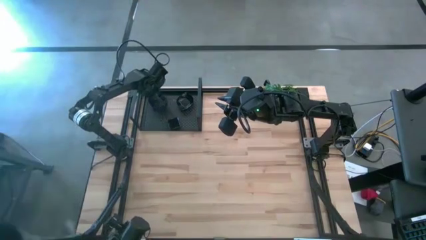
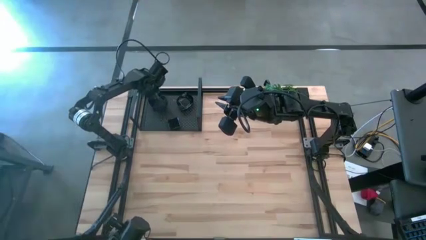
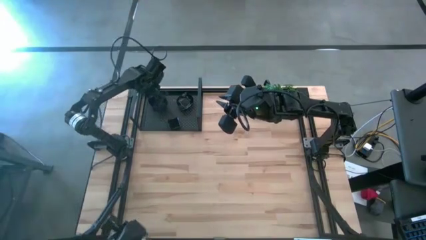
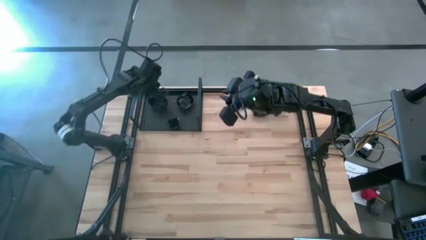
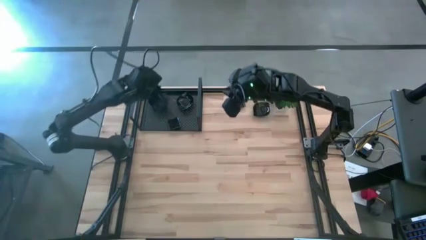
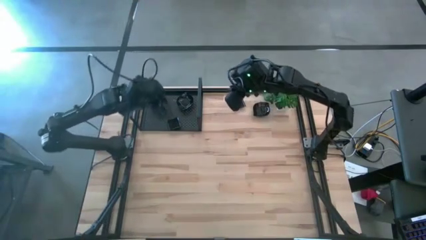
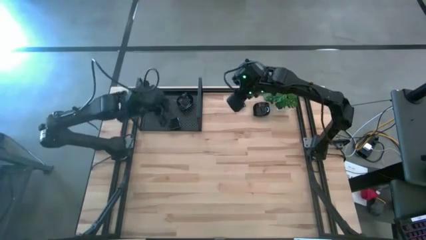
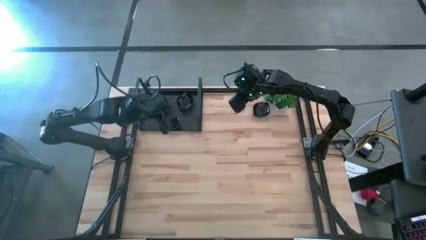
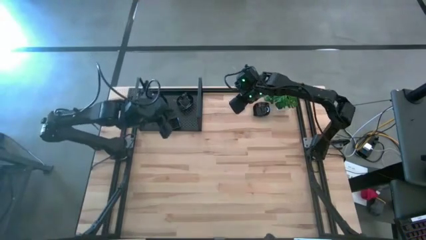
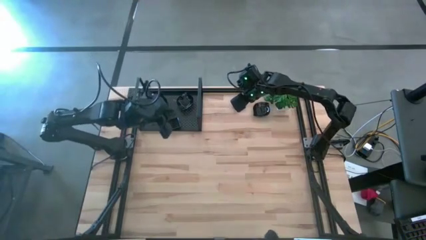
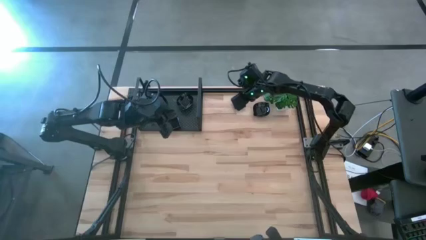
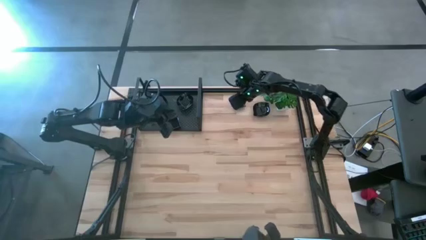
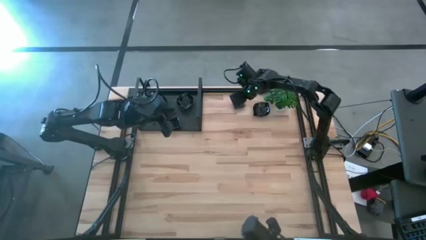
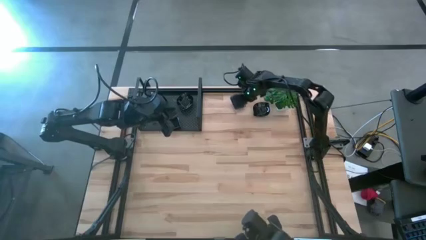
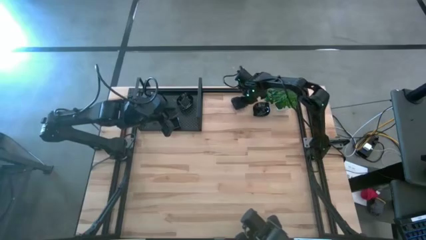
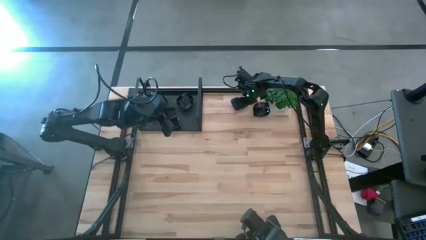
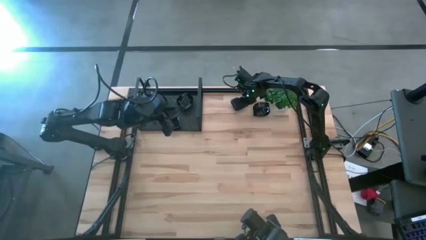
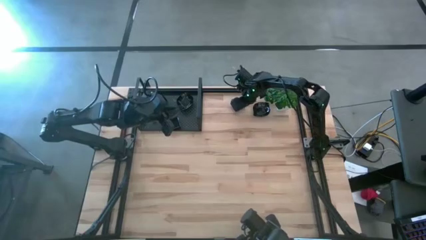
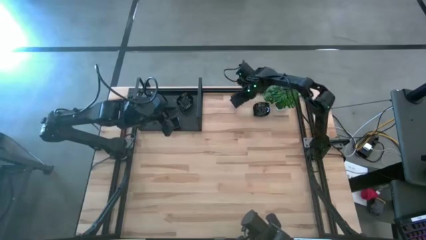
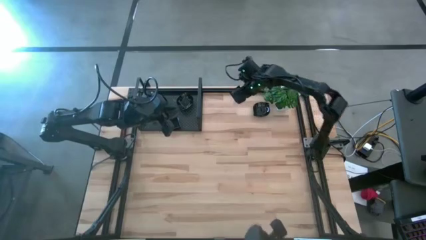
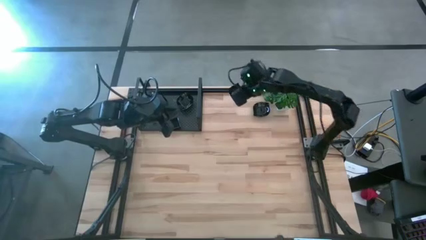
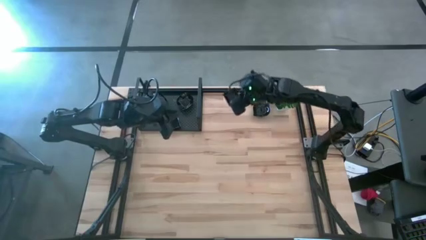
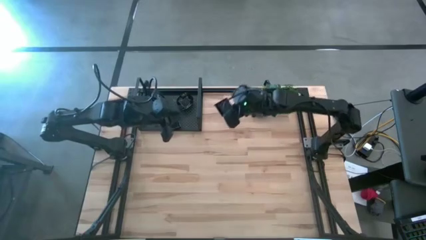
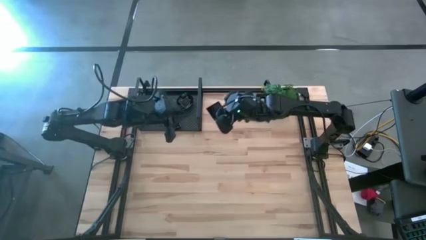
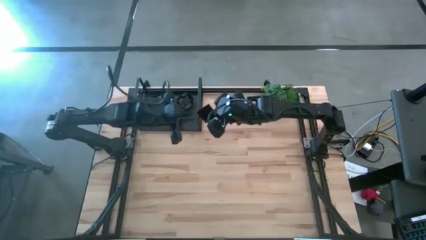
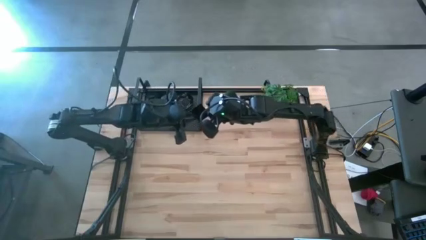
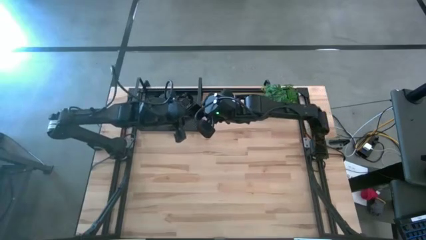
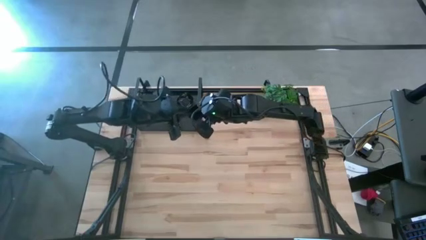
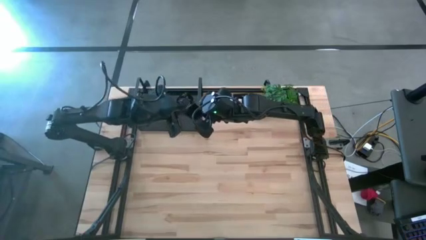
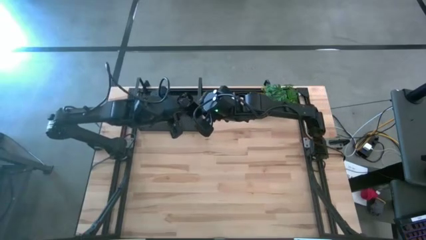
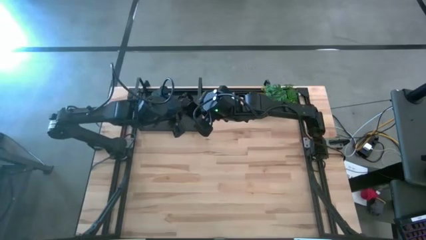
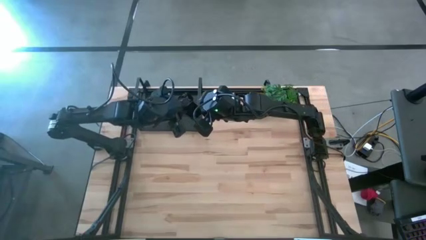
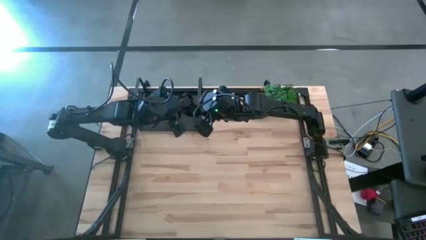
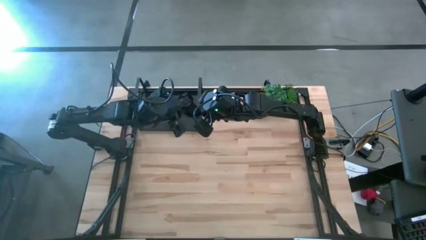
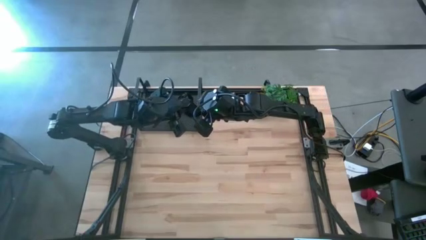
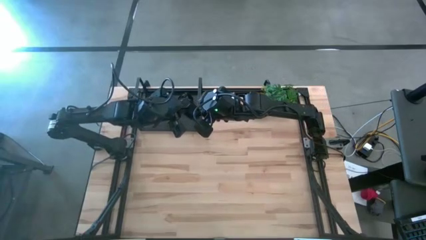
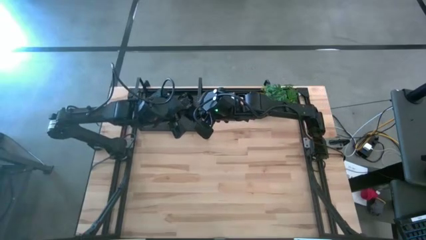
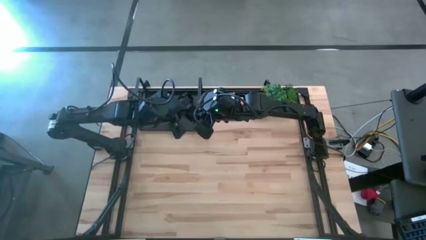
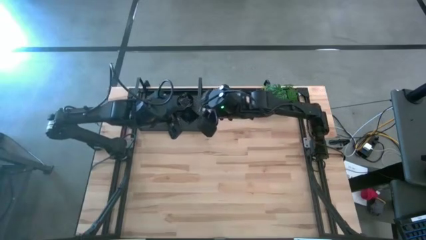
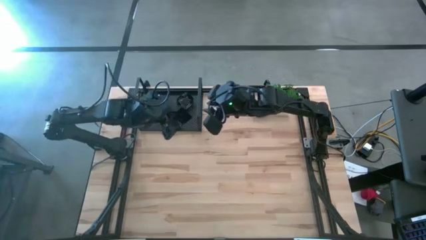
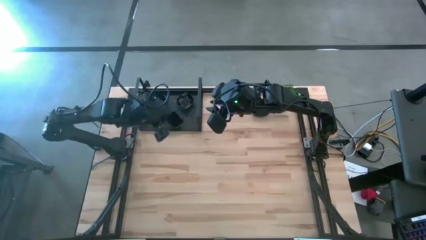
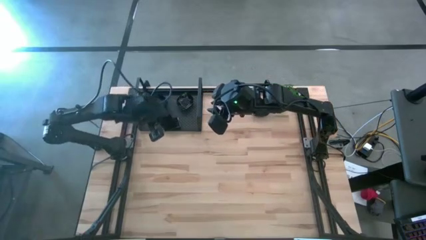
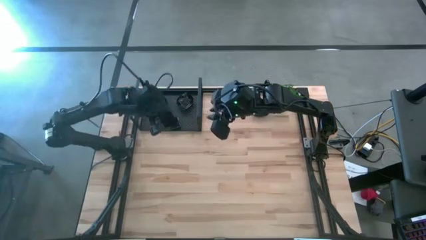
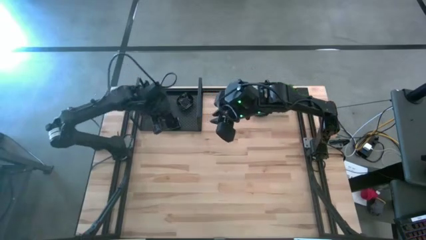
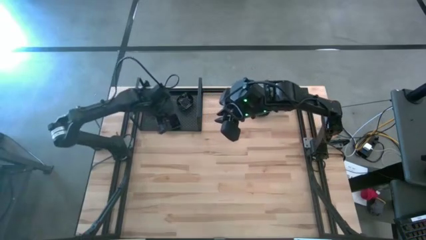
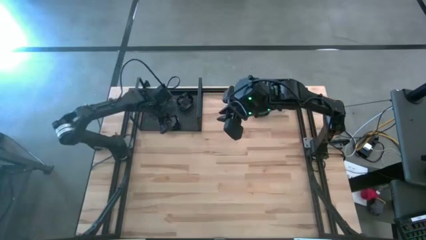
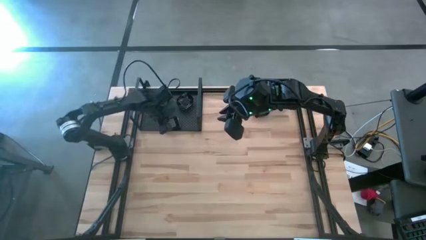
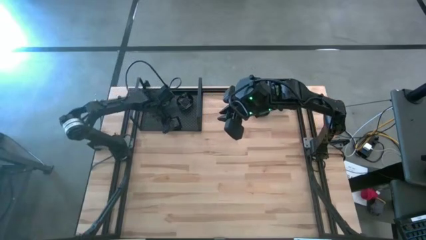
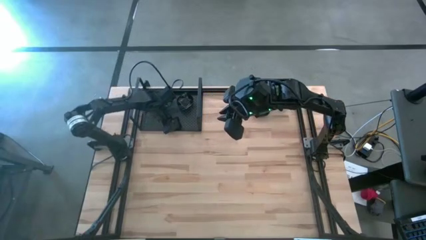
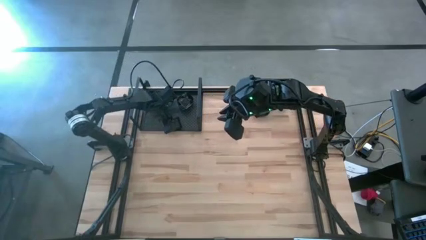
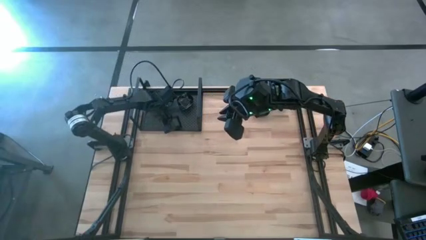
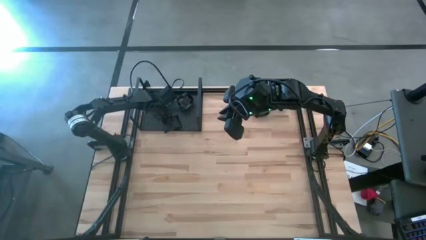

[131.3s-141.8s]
Task: Pick & Place Mini shaped plates
Stack the black square plate on top of the black square plates on the shelf

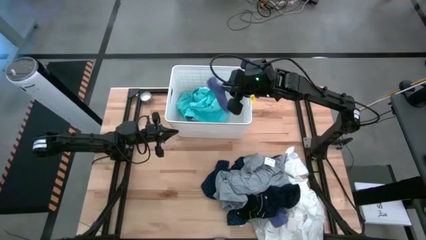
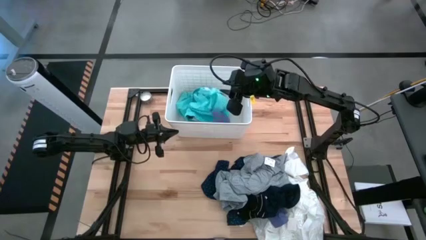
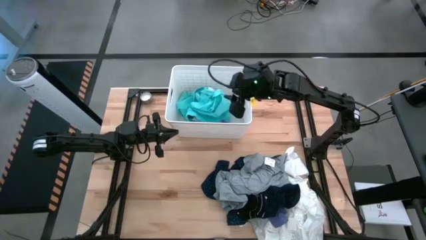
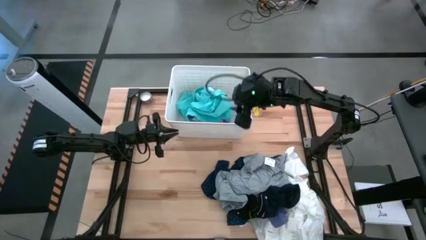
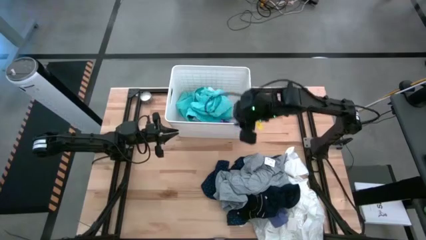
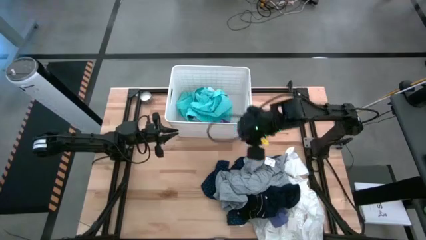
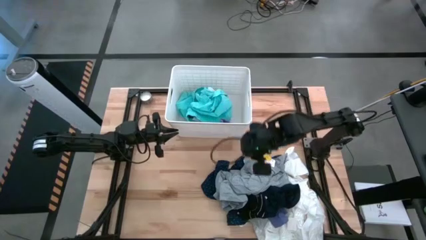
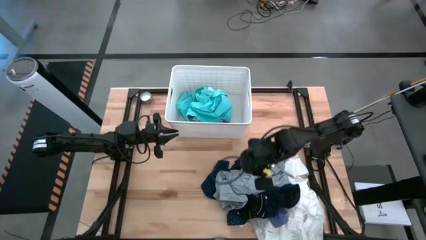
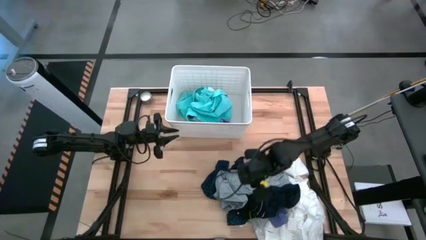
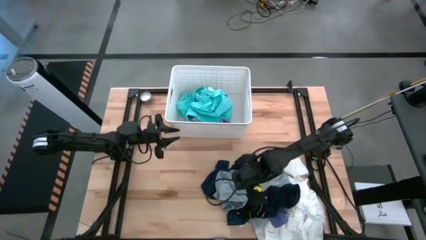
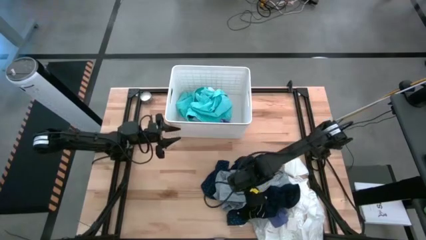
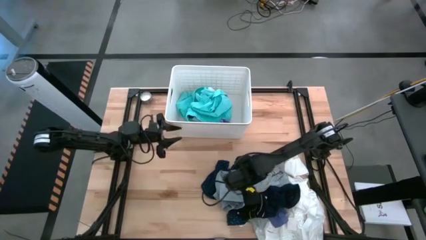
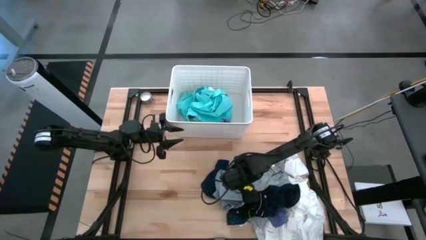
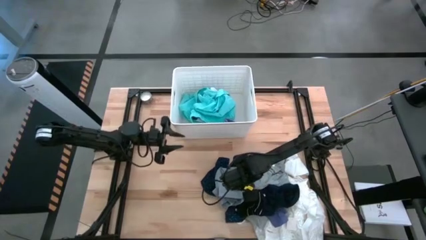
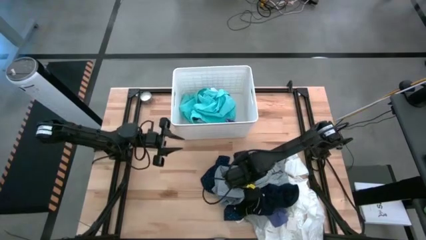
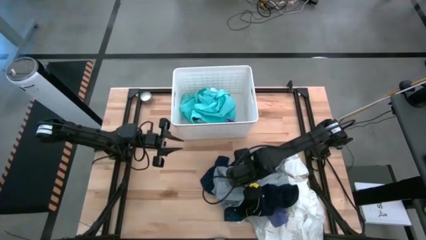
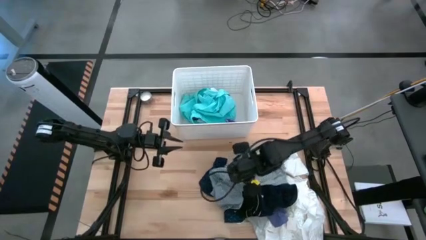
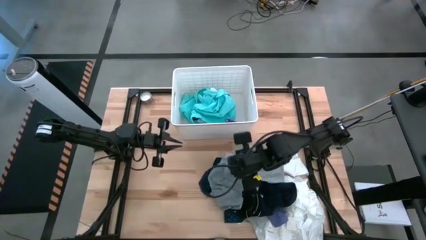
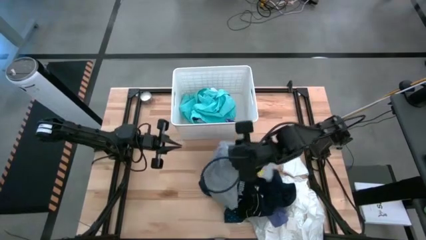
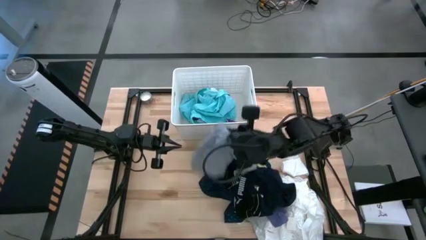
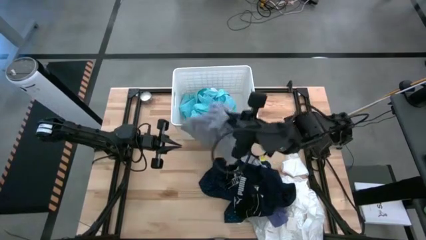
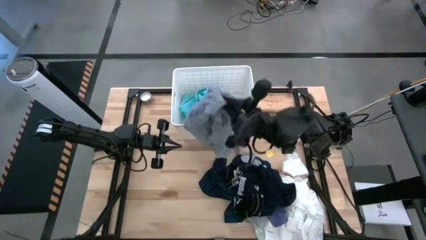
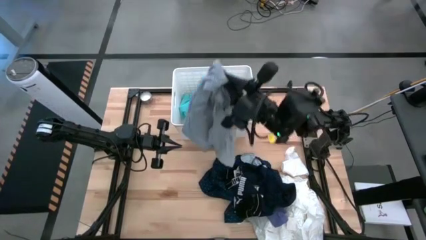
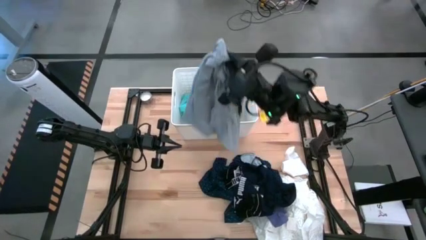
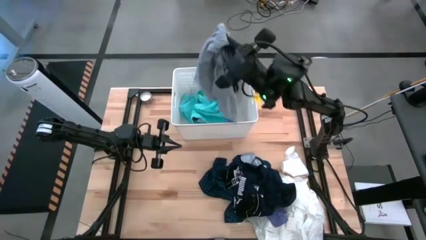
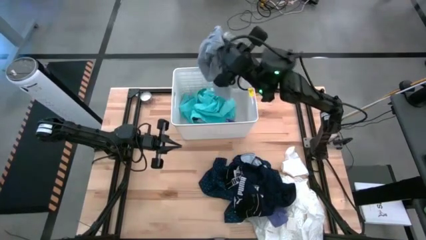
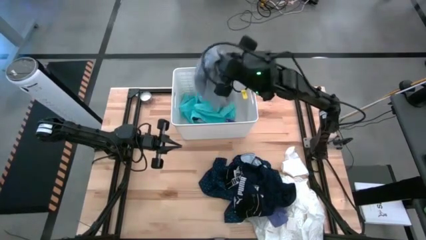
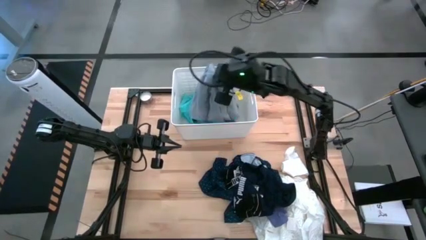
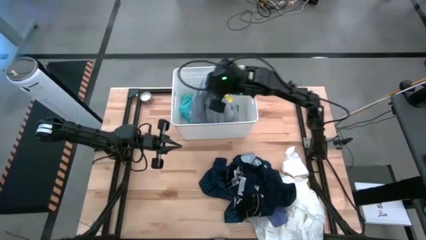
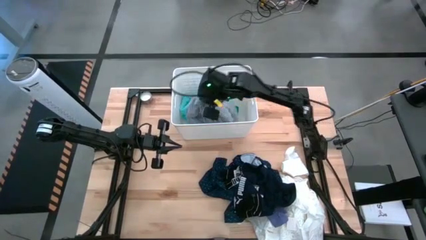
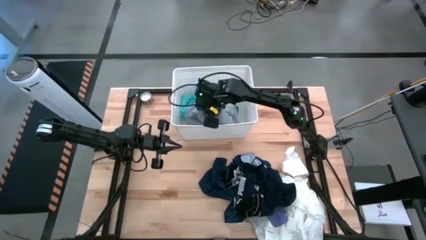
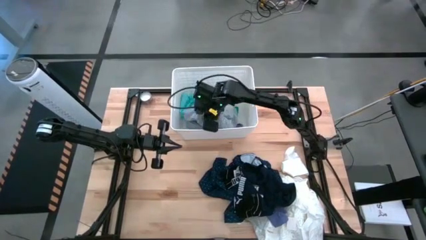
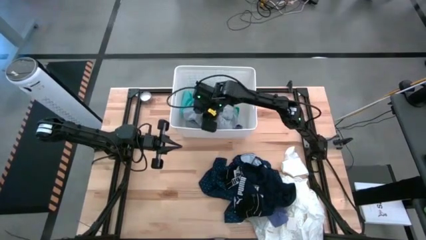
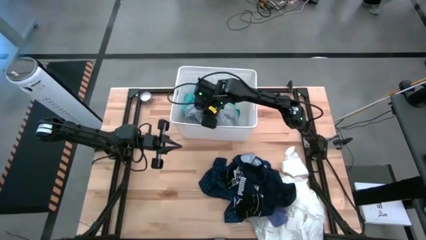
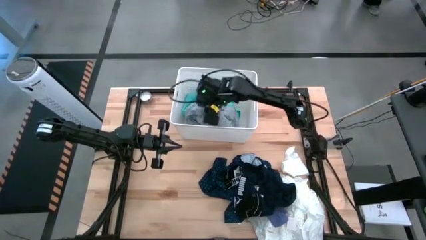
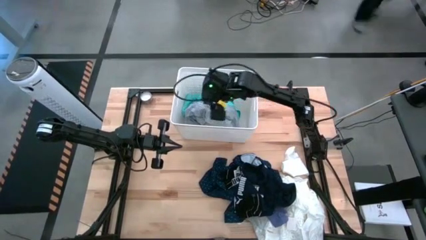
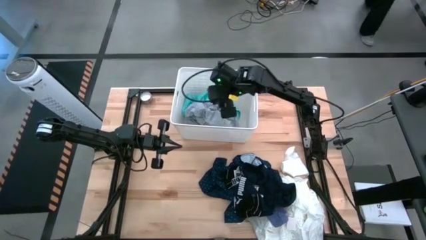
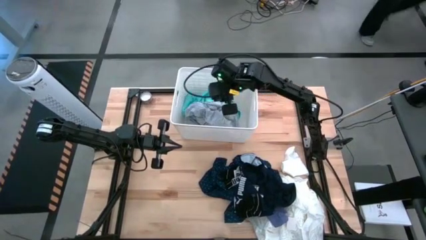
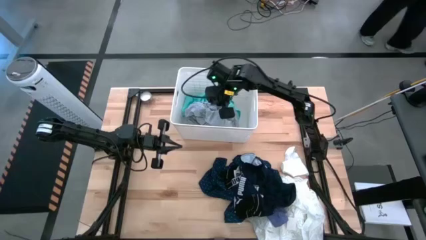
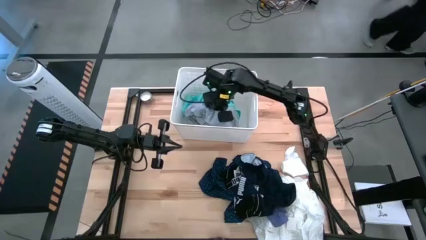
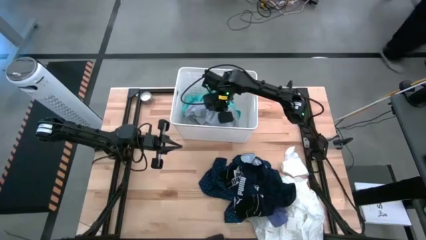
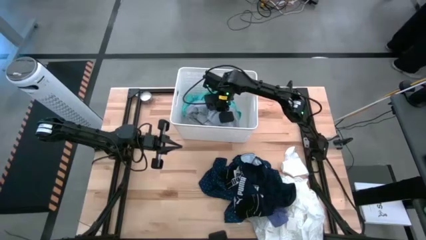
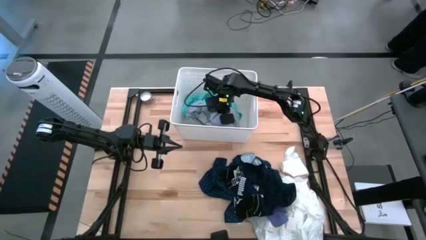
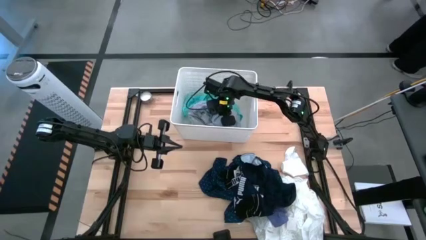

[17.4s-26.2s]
Task: Sort clothes
Put the gray shorts into the laundry organizer
